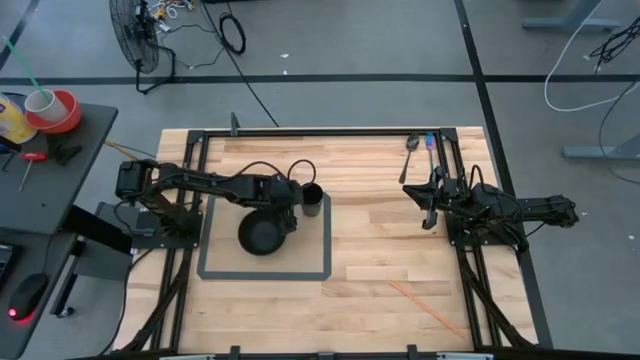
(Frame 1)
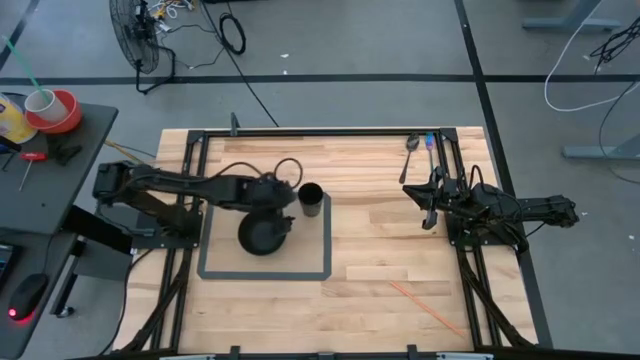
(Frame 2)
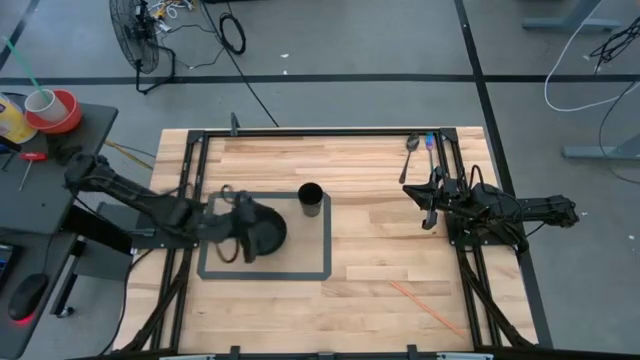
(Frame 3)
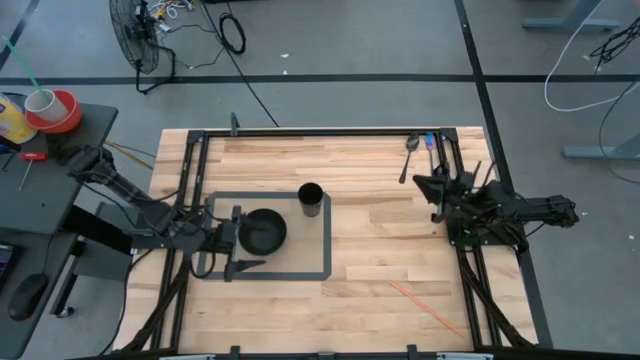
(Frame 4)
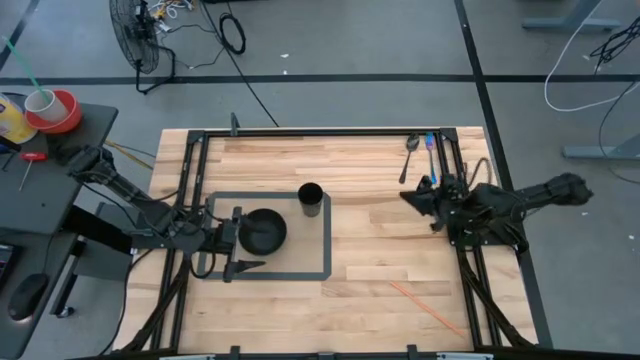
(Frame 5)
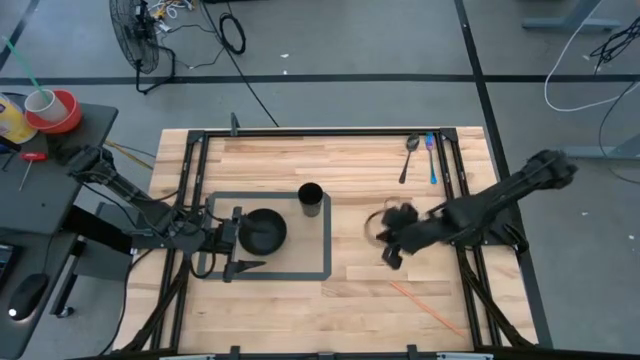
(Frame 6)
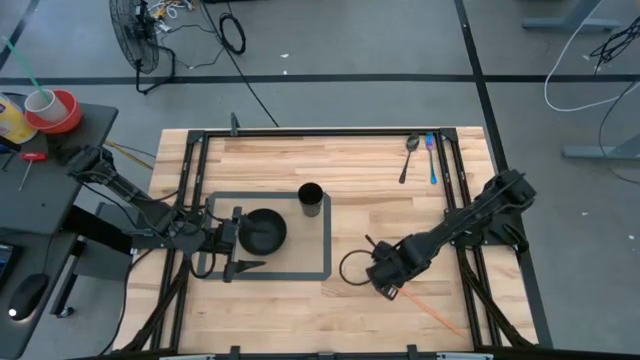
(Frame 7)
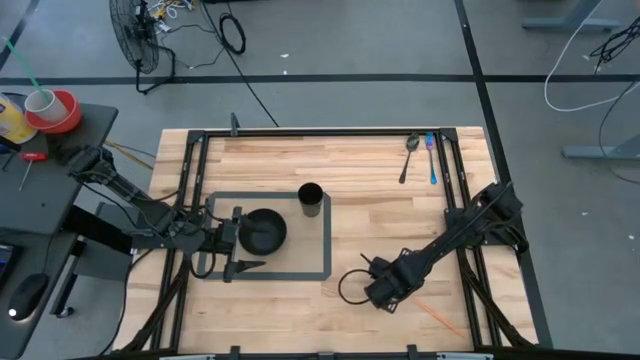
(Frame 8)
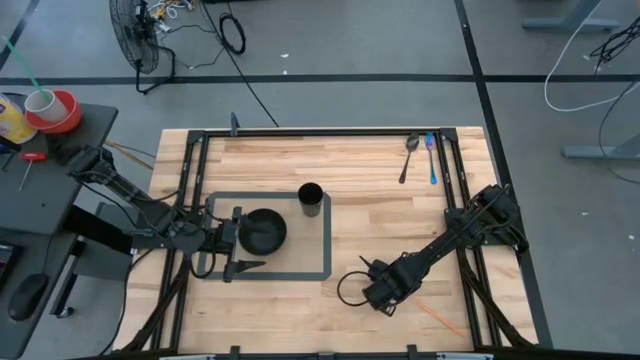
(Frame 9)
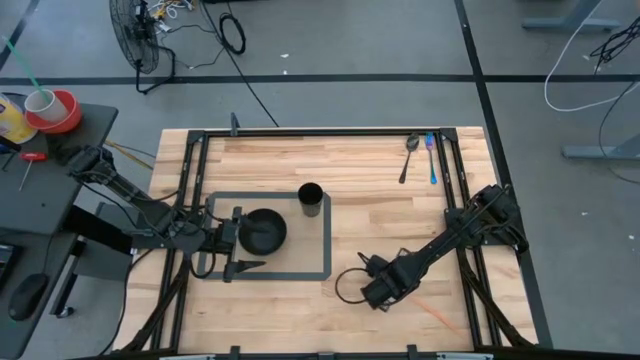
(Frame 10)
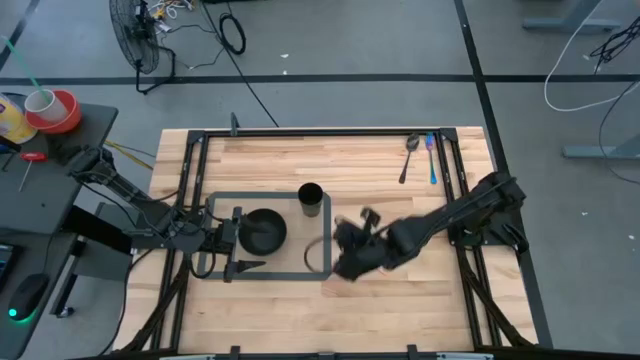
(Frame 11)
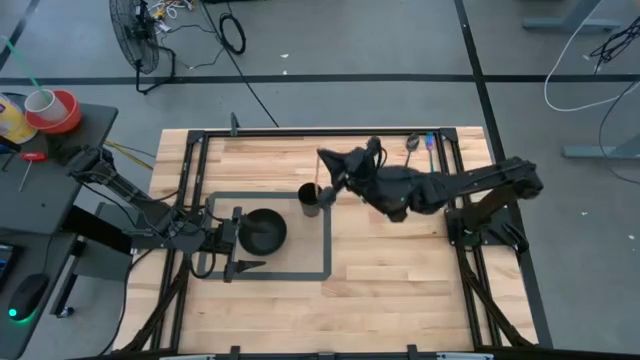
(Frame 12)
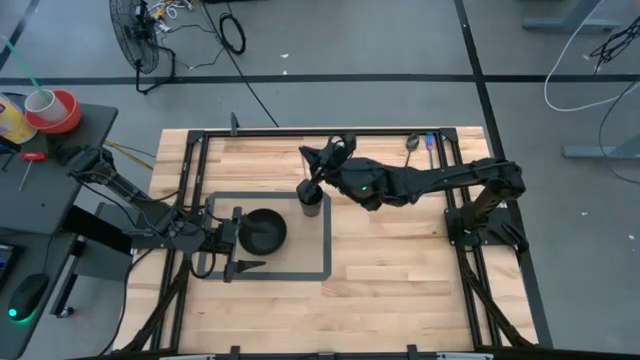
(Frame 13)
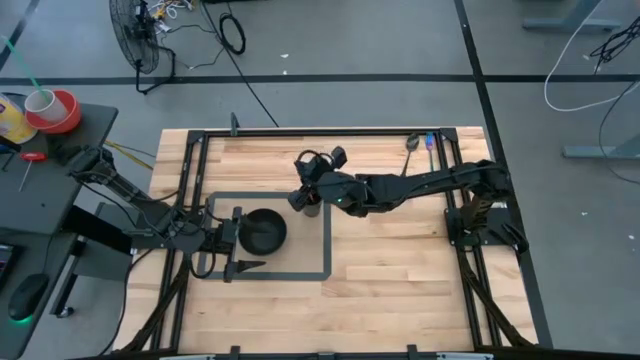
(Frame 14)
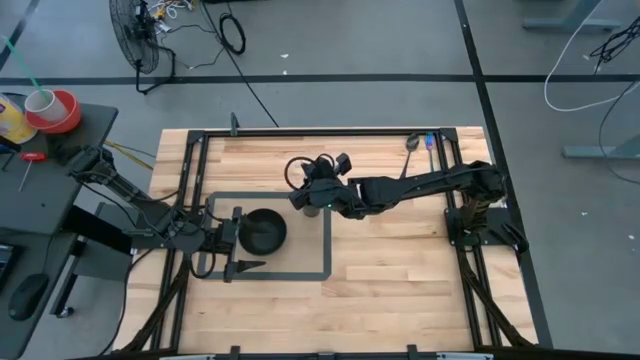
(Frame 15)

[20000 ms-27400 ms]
Task: Pick & Place Utensil
Put the orange straw into the black cup

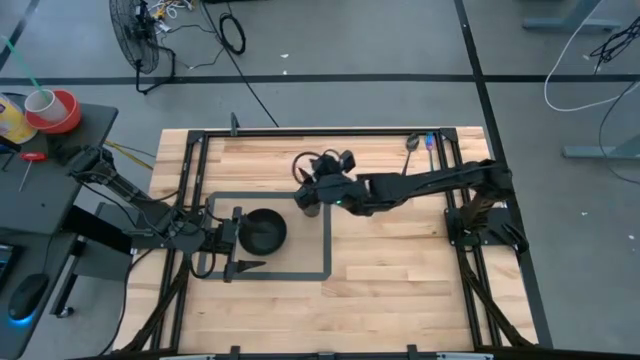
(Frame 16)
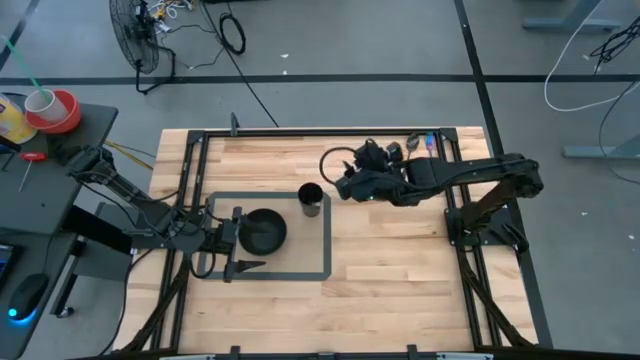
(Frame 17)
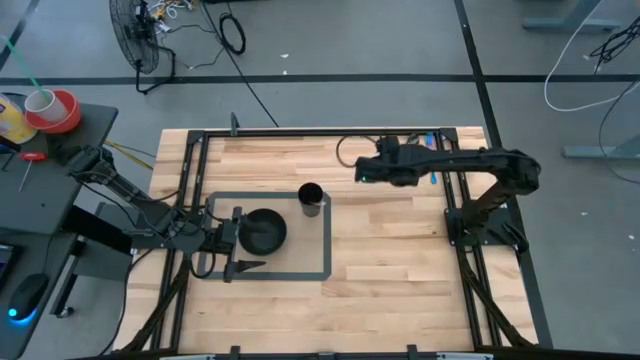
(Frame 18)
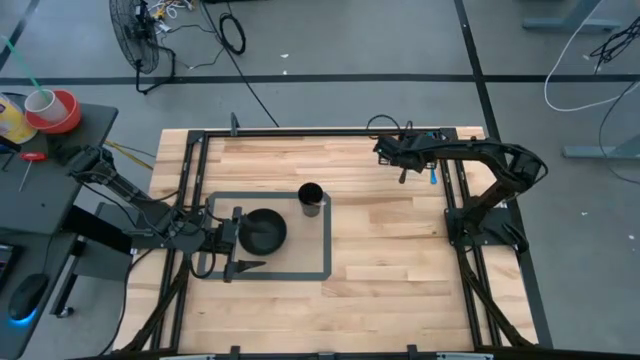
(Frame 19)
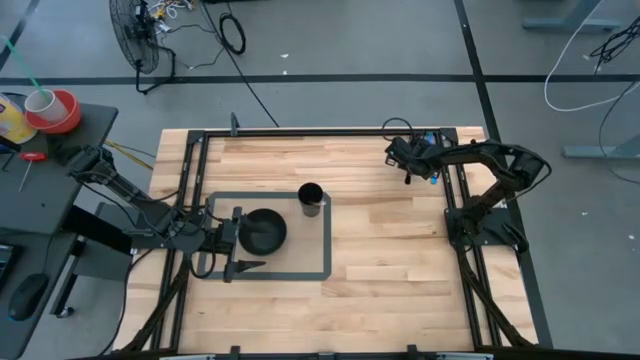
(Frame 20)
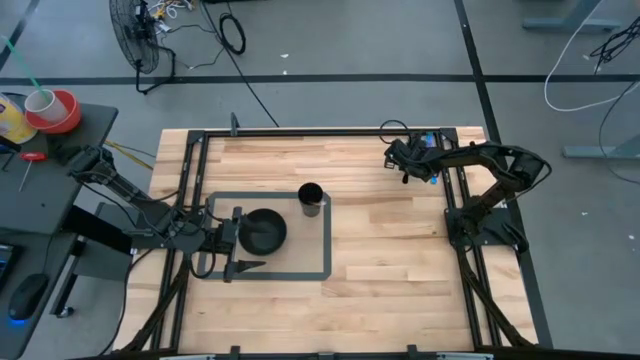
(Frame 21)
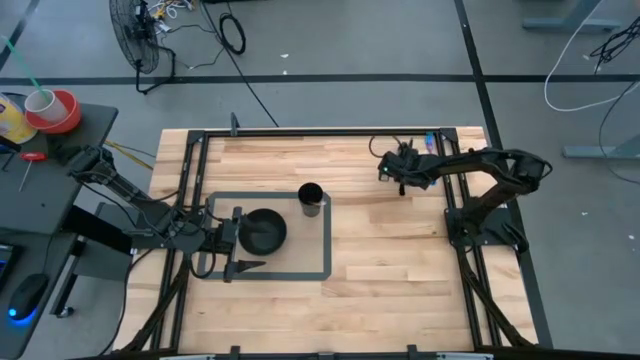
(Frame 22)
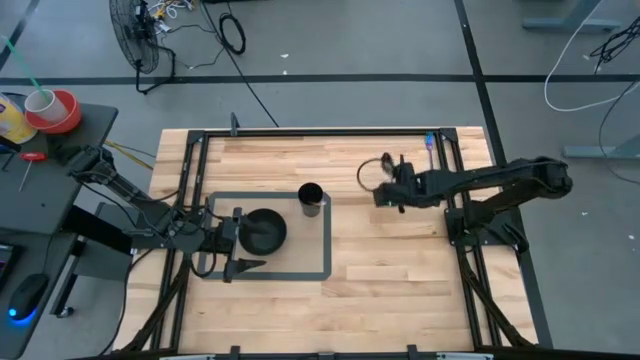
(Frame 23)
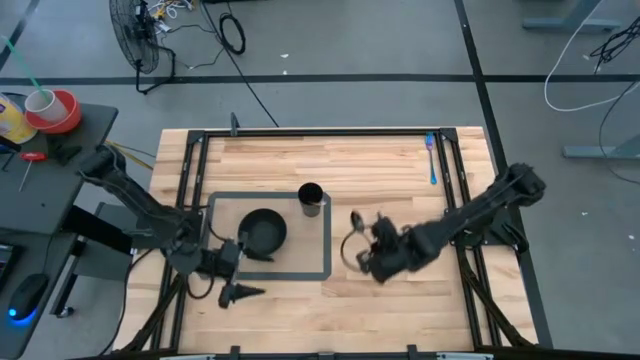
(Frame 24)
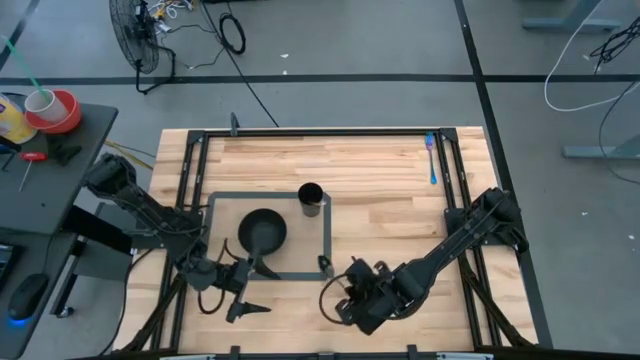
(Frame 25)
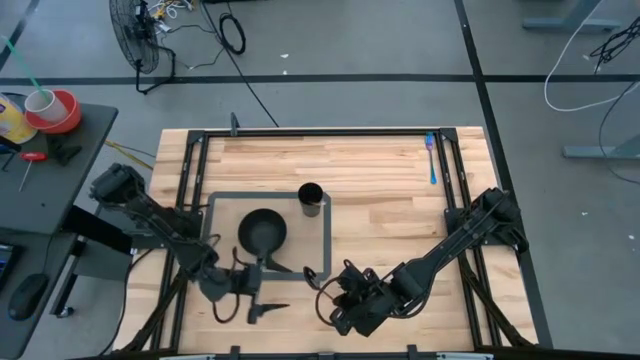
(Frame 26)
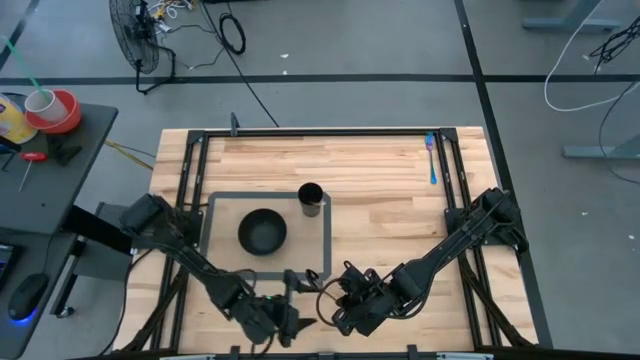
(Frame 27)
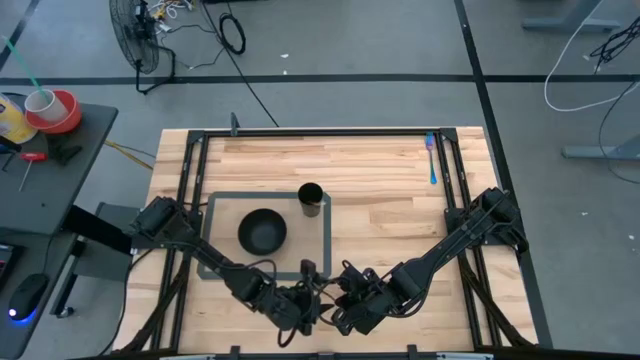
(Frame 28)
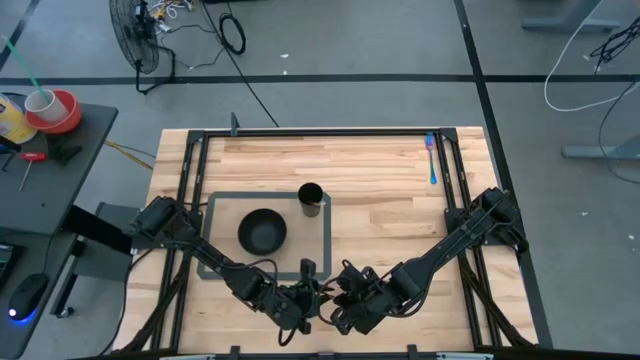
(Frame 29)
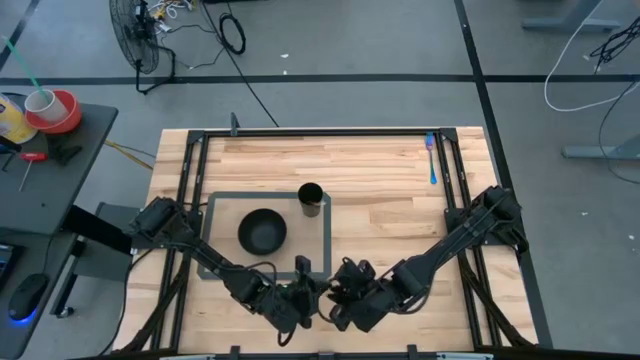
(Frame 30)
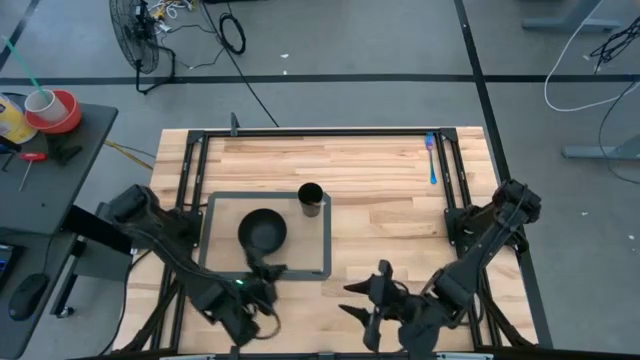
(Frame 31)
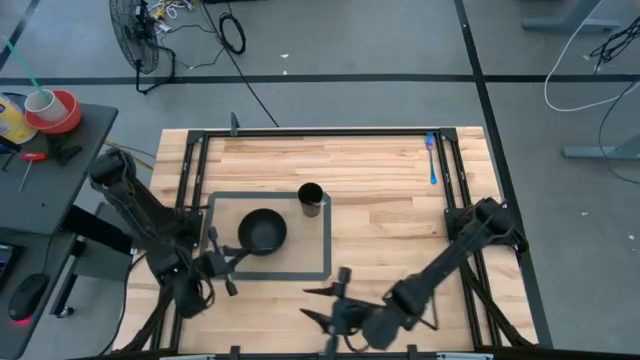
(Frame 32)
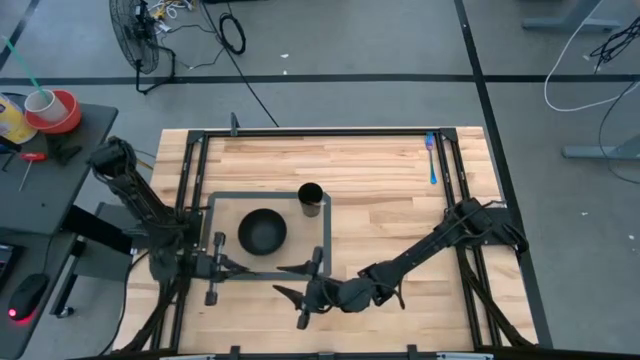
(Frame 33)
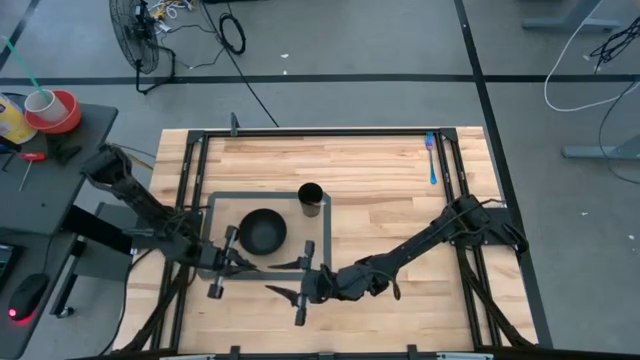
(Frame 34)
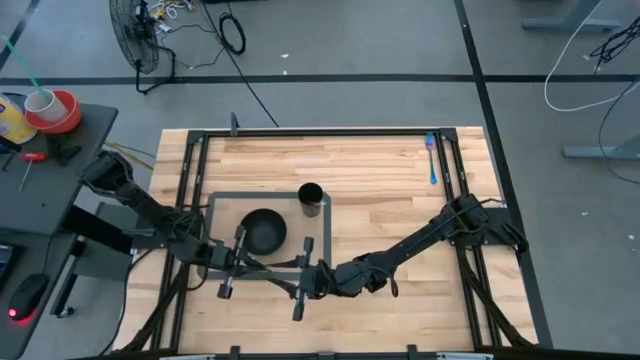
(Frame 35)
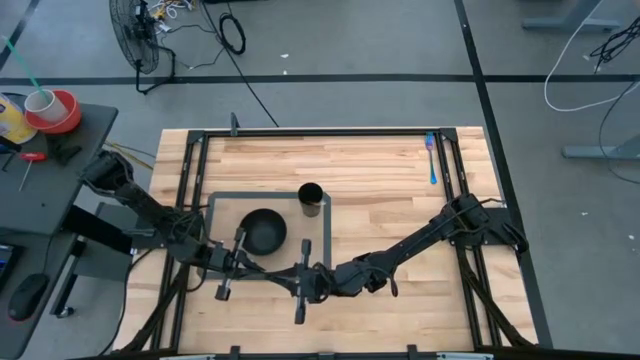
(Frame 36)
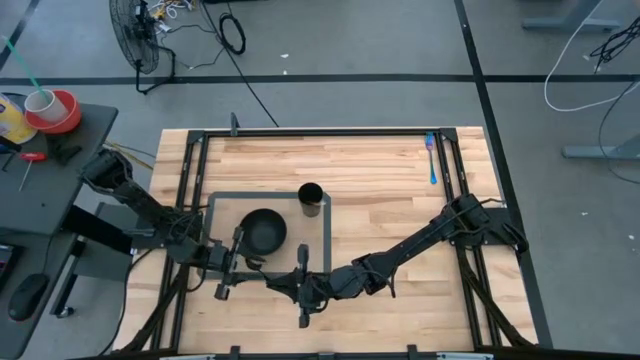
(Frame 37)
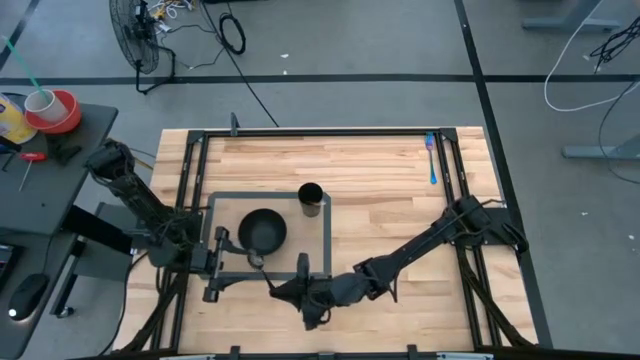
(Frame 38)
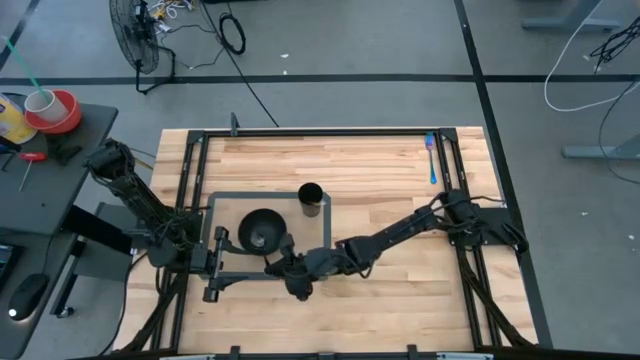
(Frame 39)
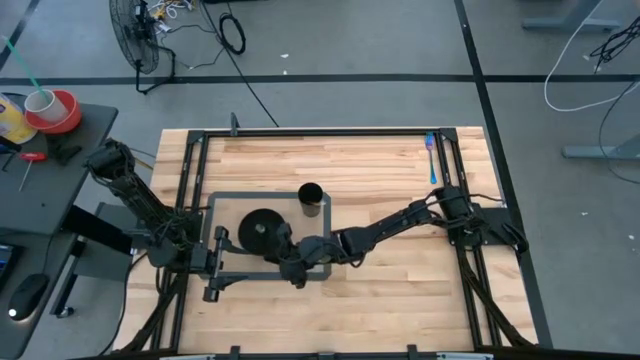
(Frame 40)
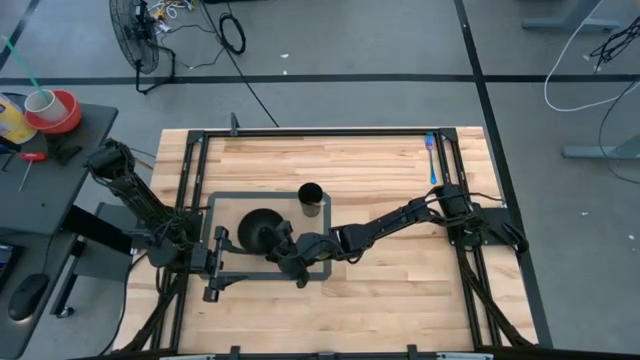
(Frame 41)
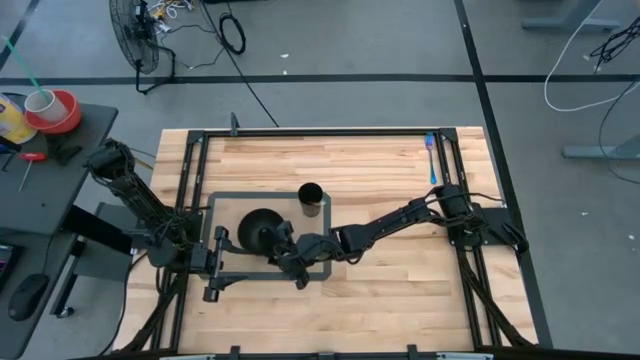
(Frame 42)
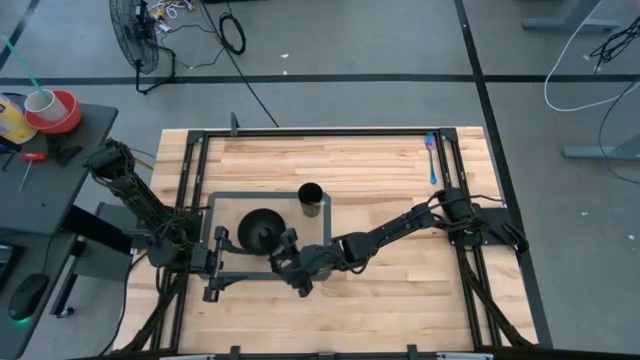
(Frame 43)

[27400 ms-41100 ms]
Put the black spoon into the black bowl
